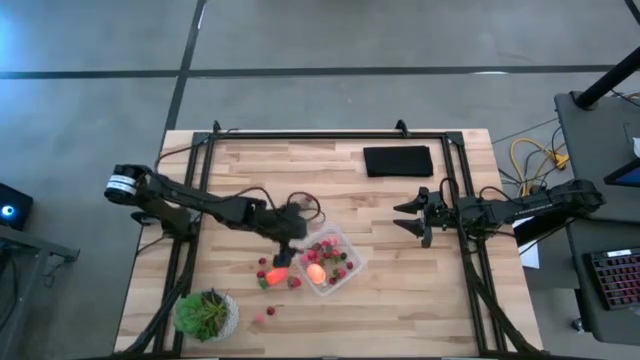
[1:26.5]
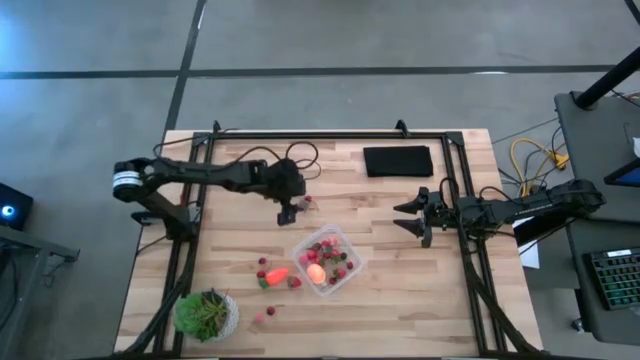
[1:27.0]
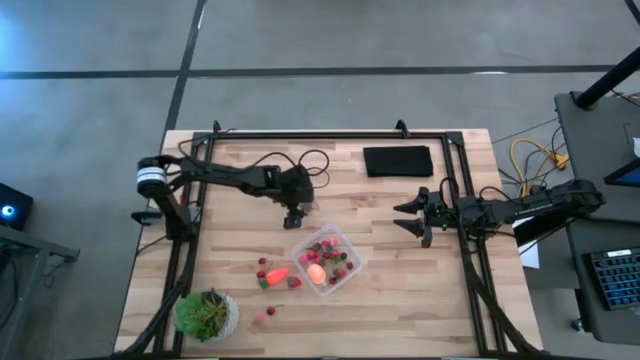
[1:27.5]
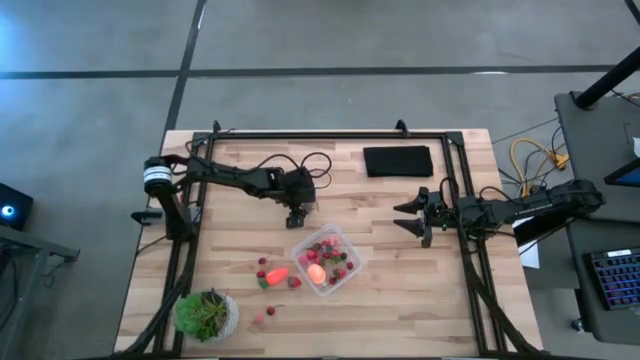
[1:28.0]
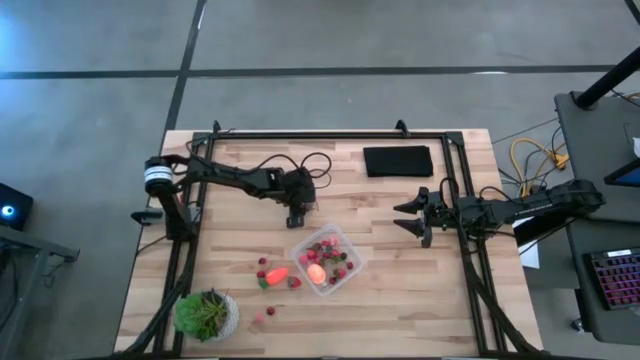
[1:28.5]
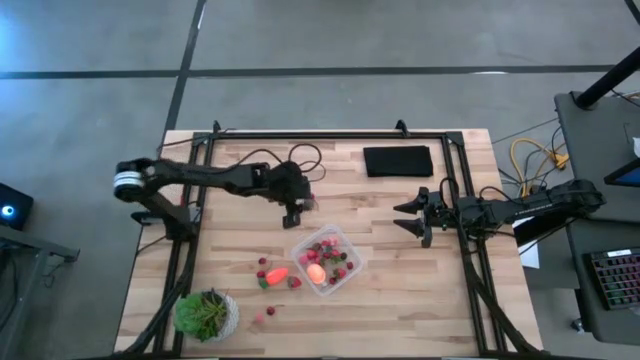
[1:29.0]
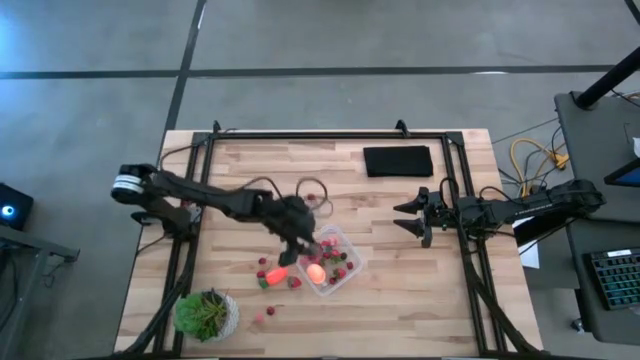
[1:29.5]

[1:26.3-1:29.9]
Task: Pick and placing Produce into tupperware
Put the red strawberry into the transparent container

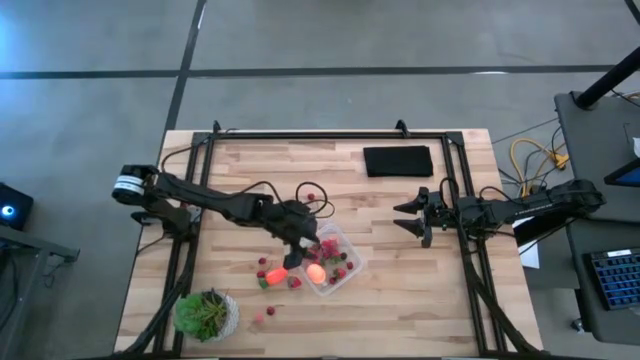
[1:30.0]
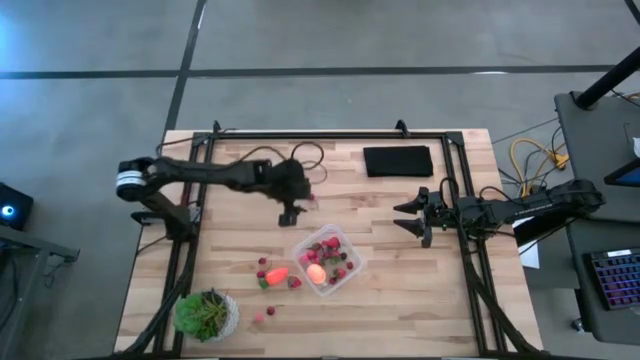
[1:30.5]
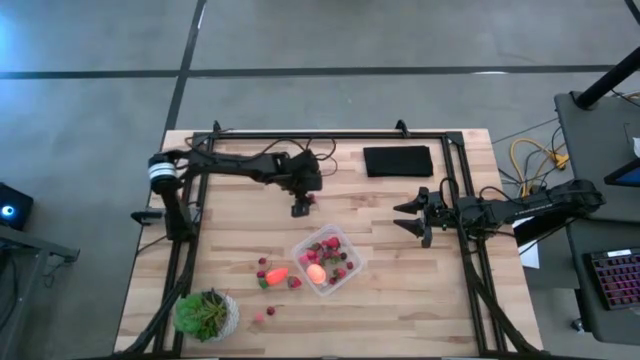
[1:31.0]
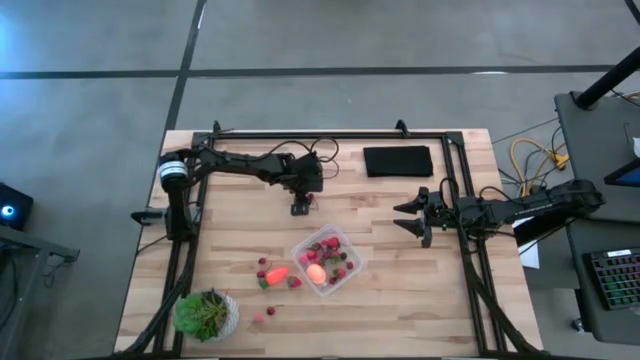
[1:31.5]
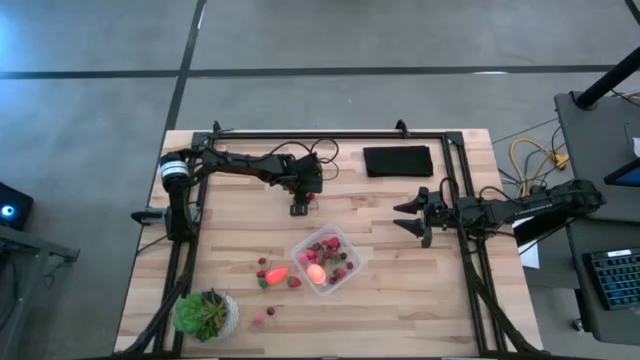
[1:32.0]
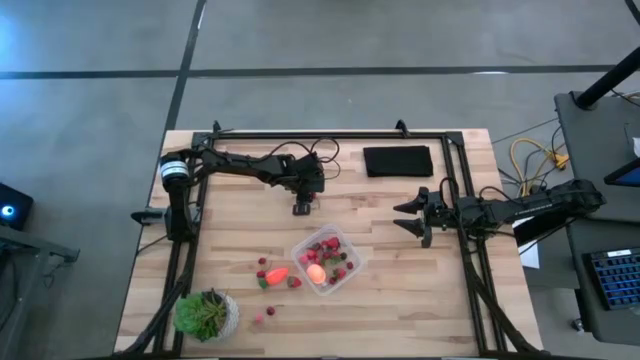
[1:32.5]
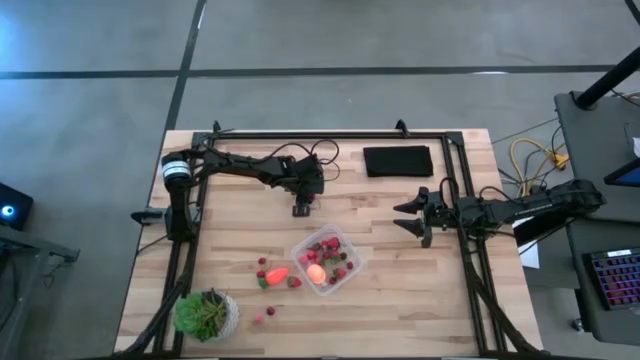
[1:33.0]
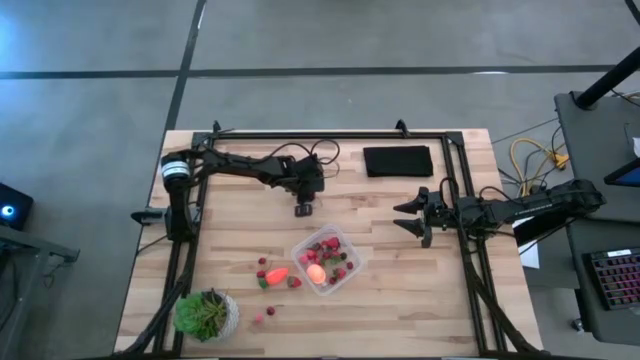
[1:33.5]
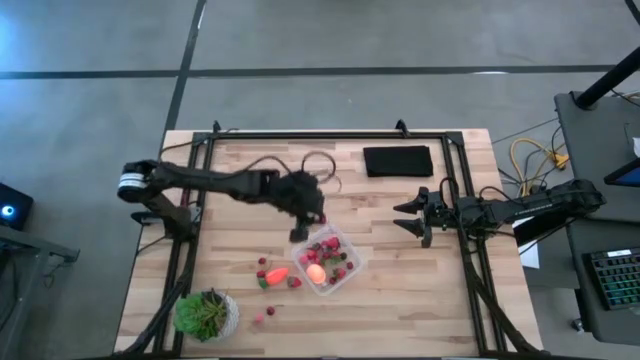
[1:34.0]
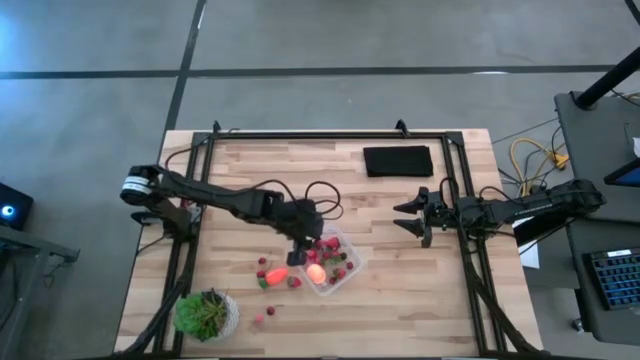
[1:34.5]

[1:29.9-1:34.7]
Put the red cherry into the transparent container

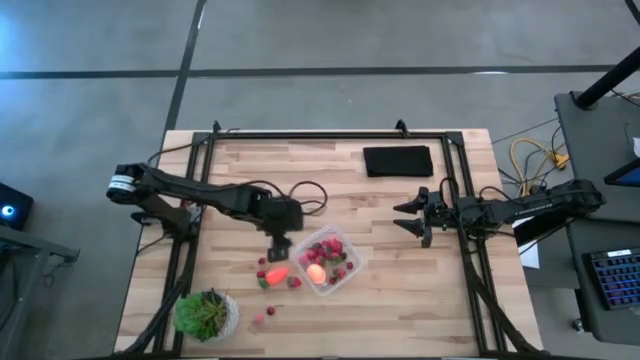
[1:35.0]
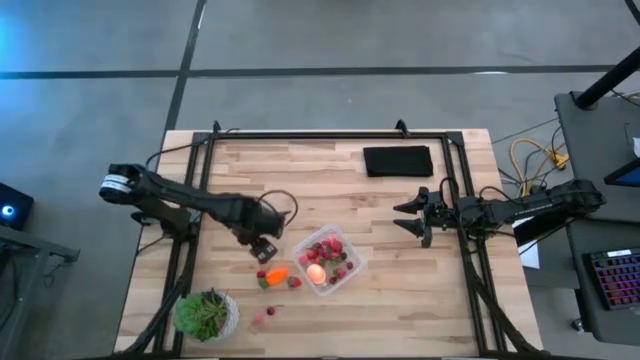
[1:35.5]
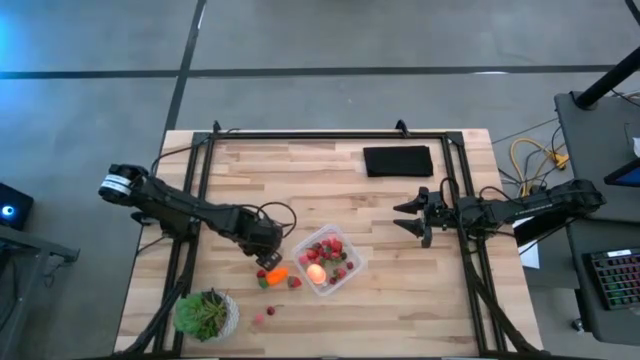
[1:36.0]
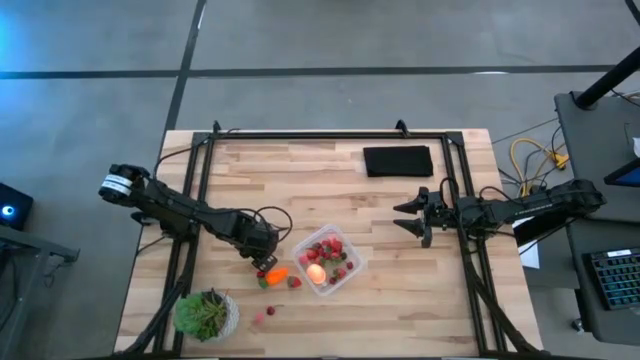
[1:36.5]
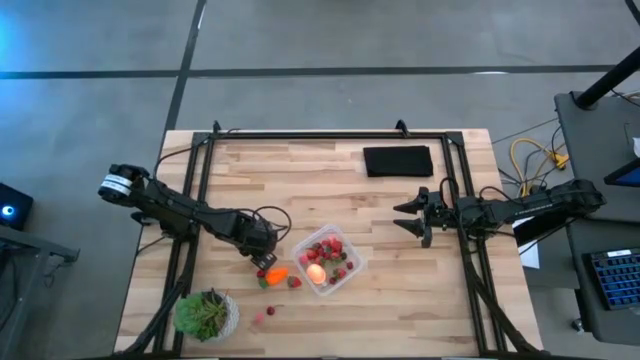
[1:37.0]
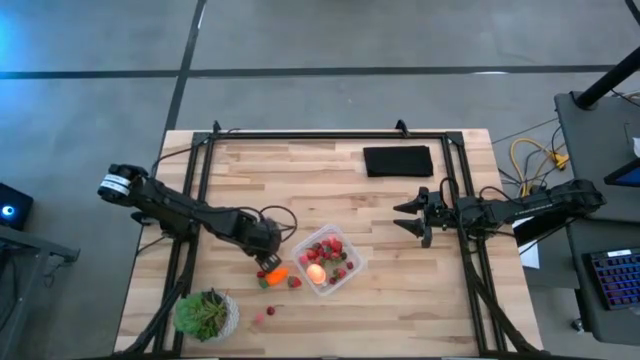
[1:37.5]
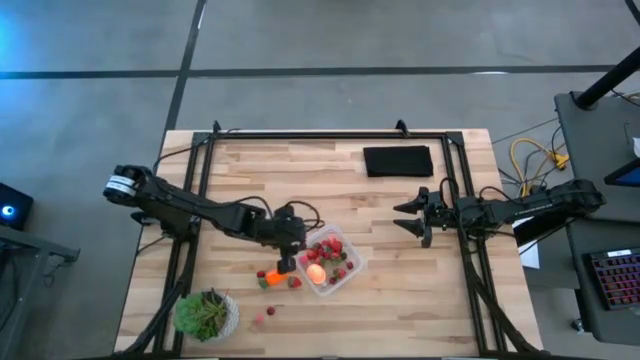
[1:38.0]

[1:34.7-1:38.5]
Put the red cherry into the transparent container

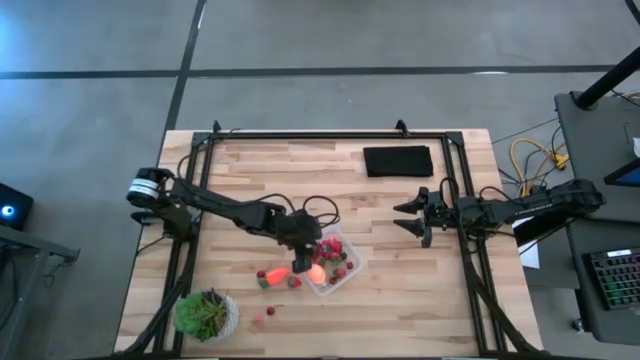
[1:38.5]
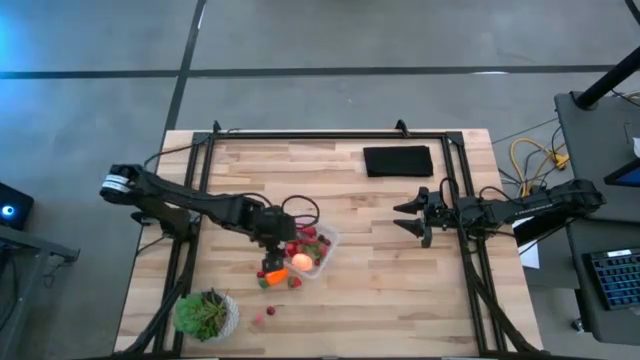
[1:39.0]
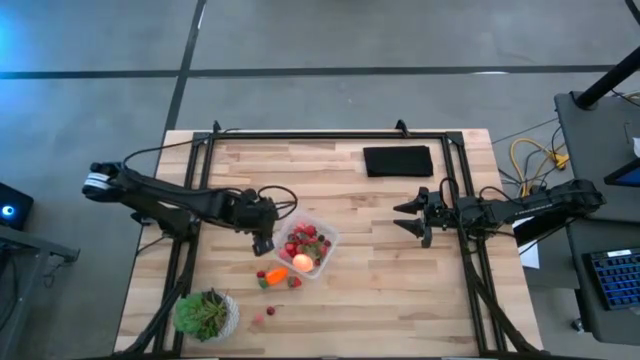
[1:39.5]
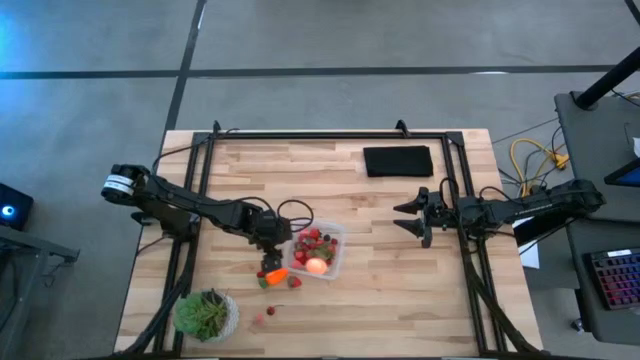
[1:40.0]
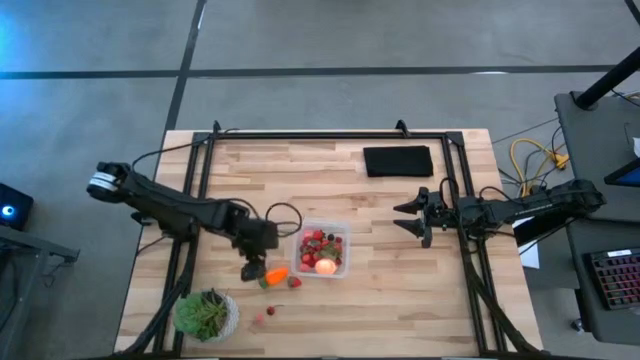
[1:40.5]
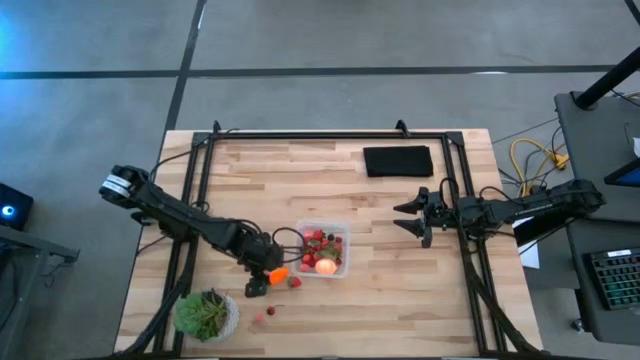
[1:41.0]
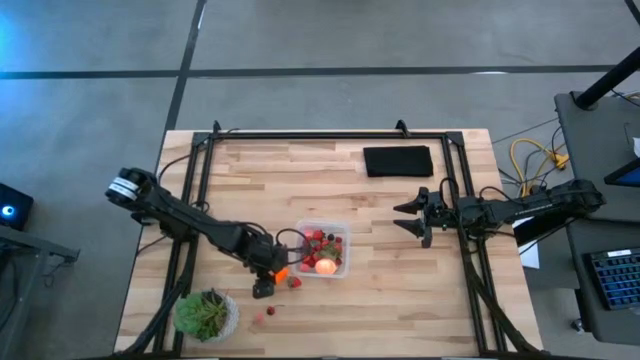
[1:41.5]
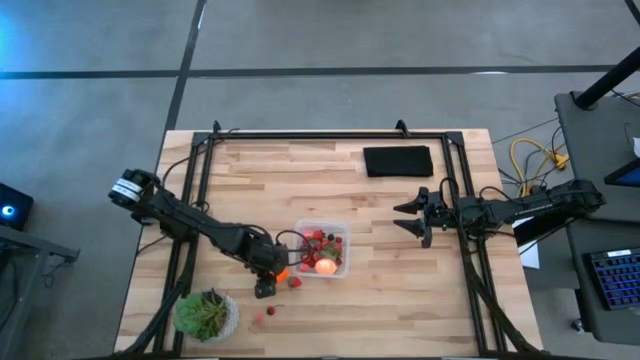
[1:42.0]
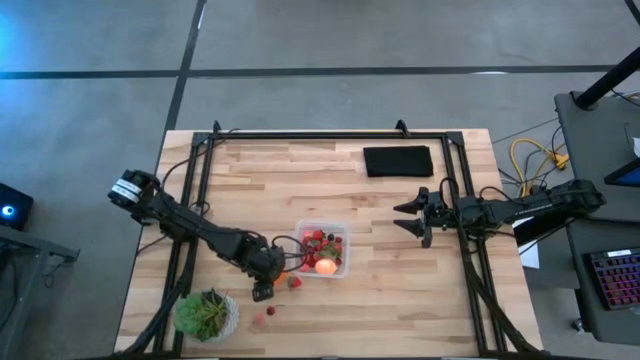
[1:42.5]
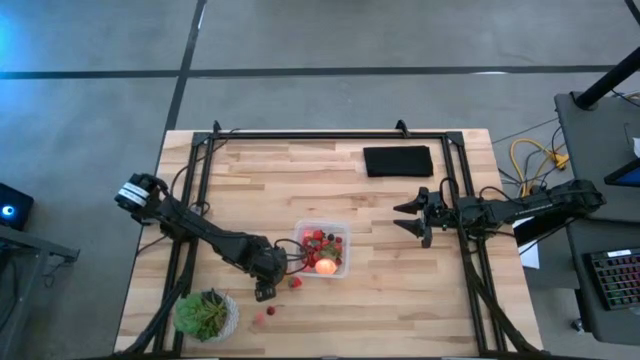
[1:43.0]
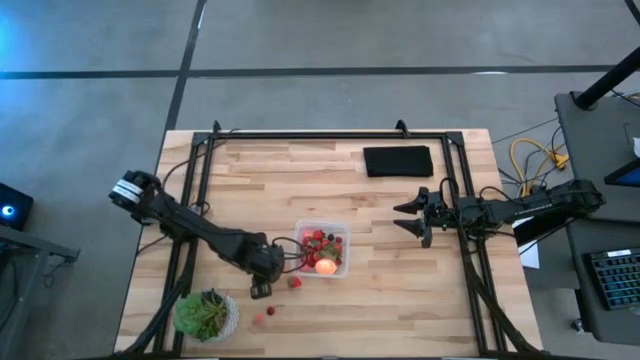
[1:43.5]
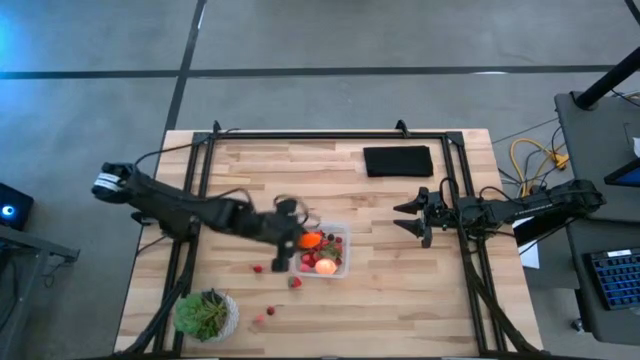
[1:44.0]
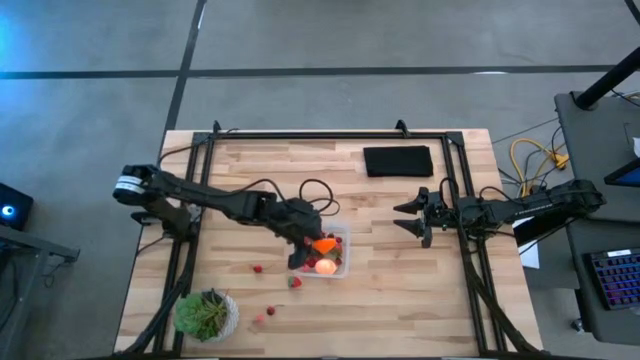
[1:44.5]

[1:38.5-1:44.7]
Put the orange carrot into the transparent container

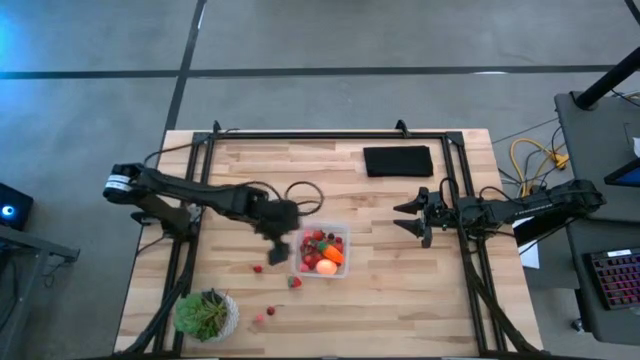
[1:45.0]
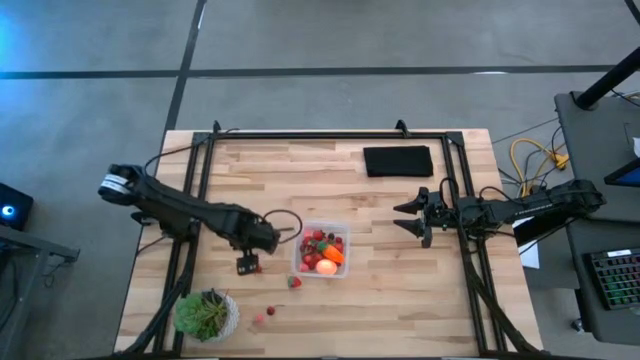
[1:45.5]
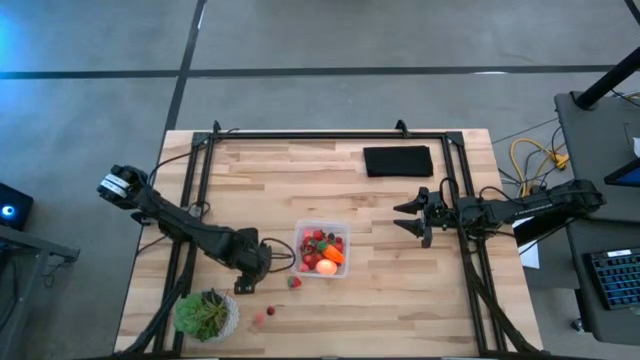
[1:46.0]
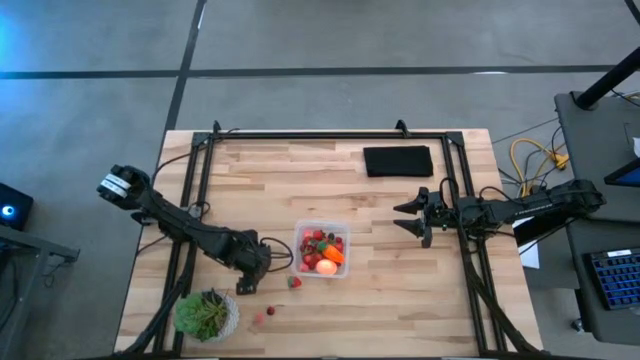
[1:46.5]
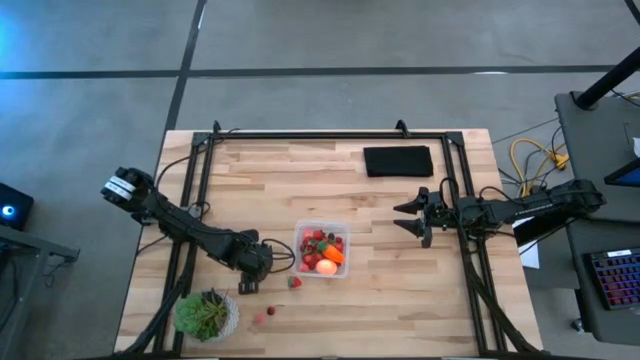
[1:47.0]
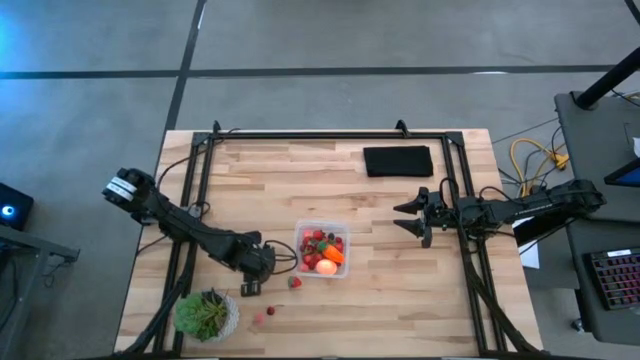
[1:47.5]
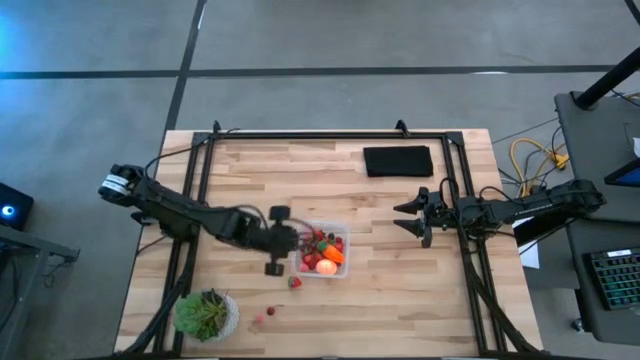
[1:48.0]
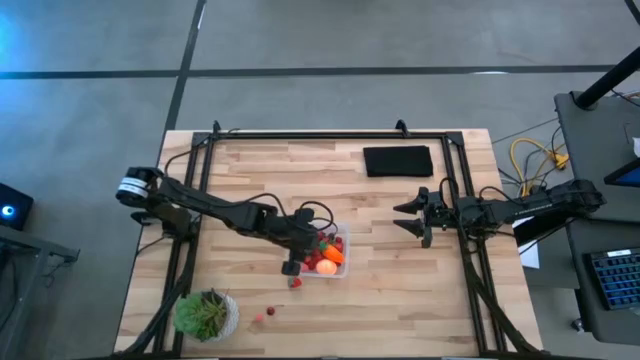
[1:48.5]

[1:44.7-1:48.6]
Put the red cherry into the transparent container
